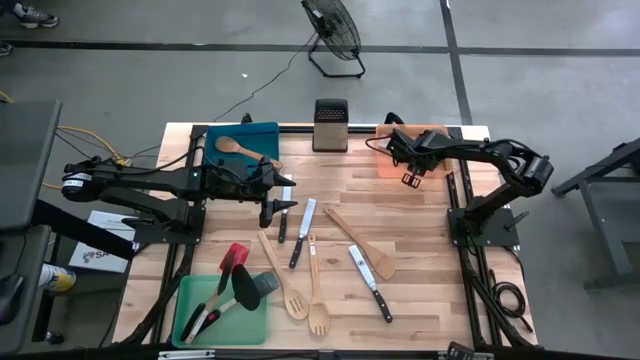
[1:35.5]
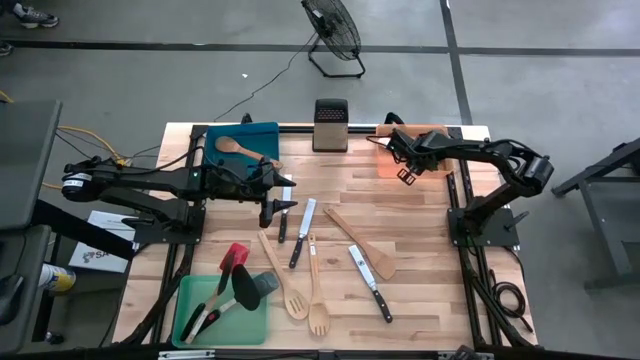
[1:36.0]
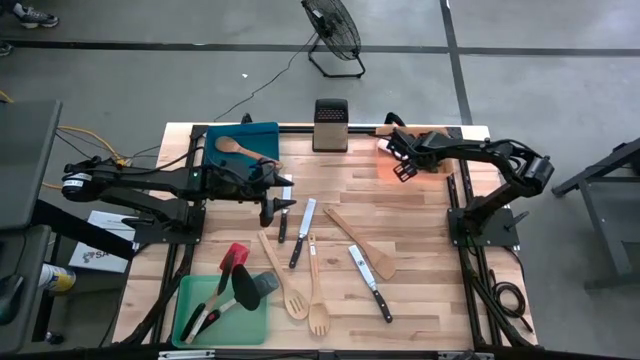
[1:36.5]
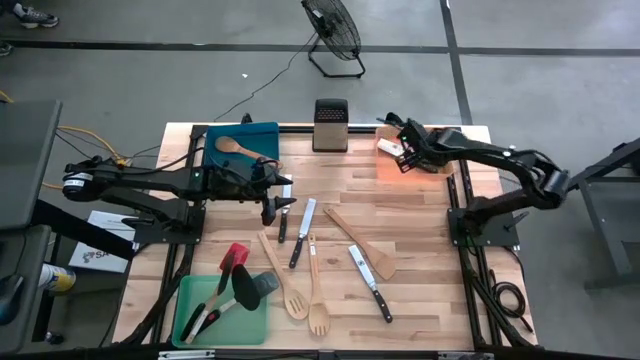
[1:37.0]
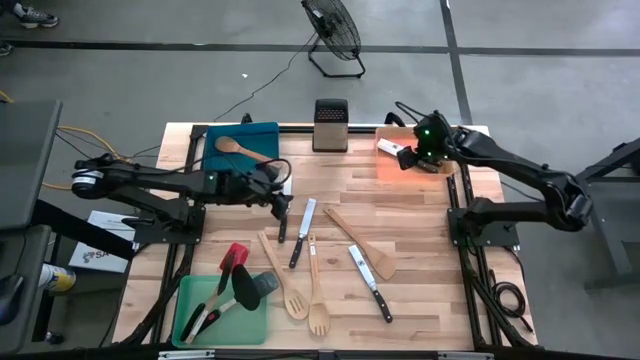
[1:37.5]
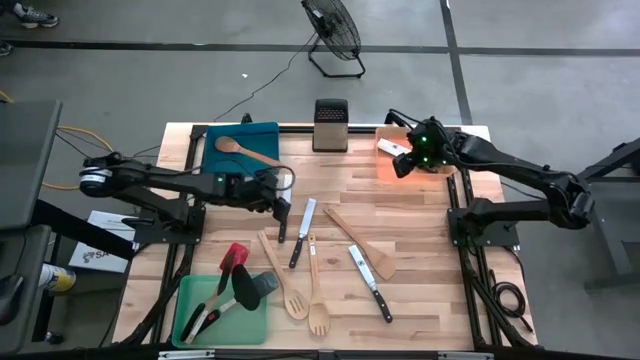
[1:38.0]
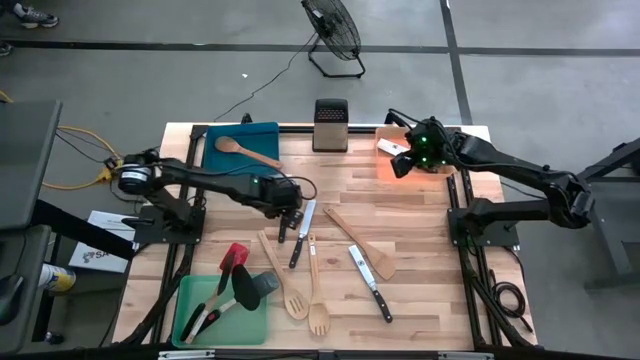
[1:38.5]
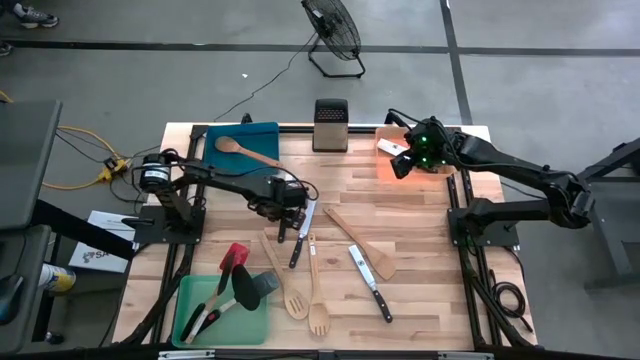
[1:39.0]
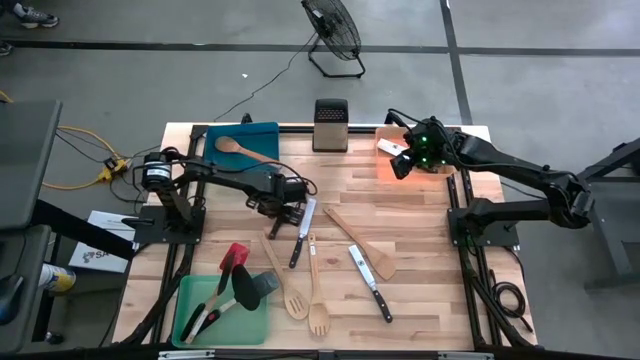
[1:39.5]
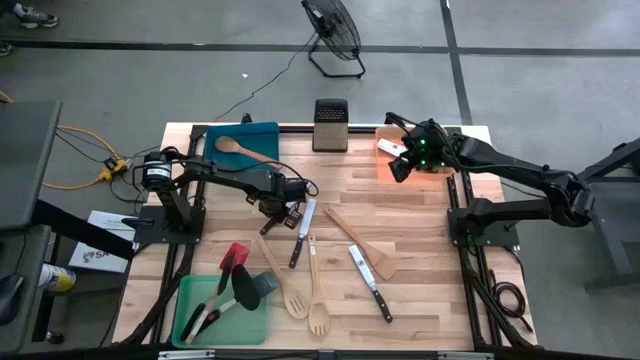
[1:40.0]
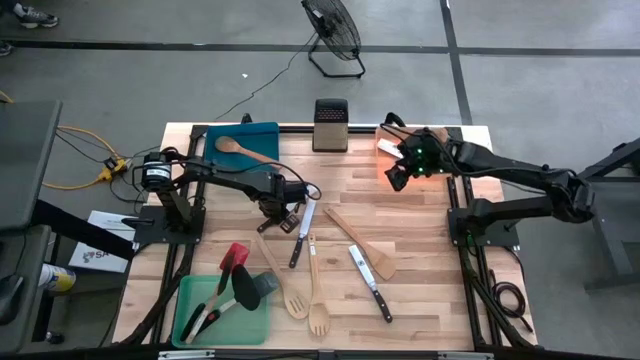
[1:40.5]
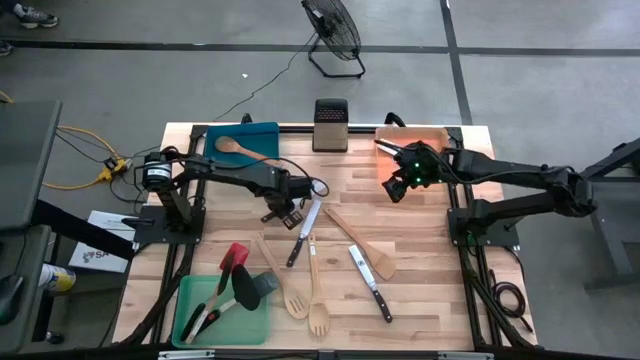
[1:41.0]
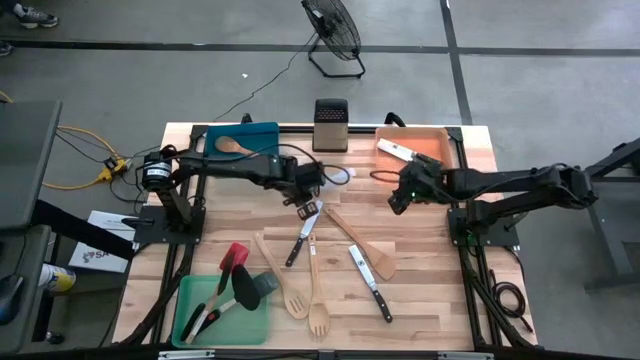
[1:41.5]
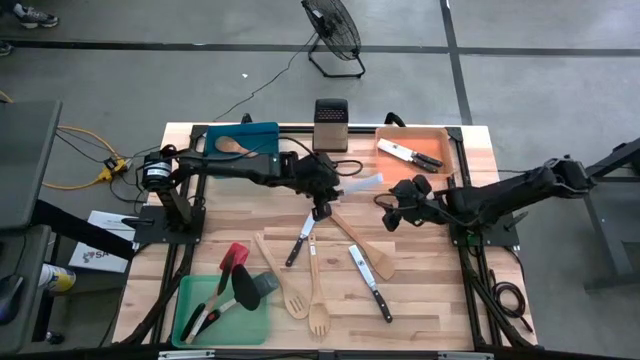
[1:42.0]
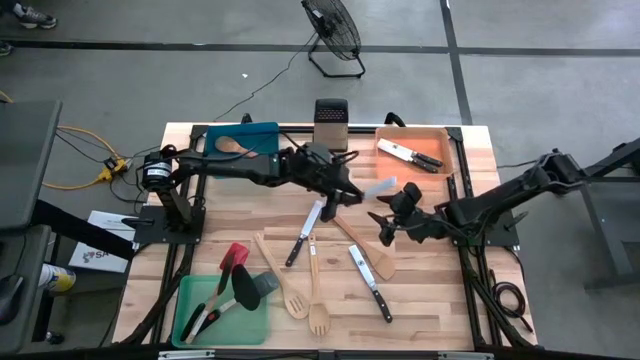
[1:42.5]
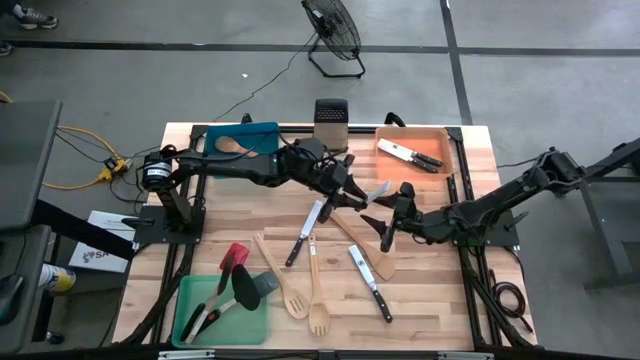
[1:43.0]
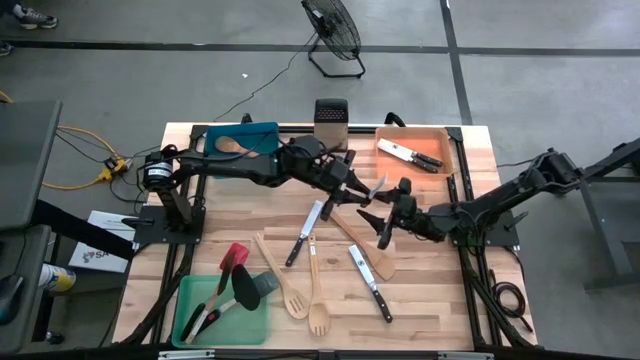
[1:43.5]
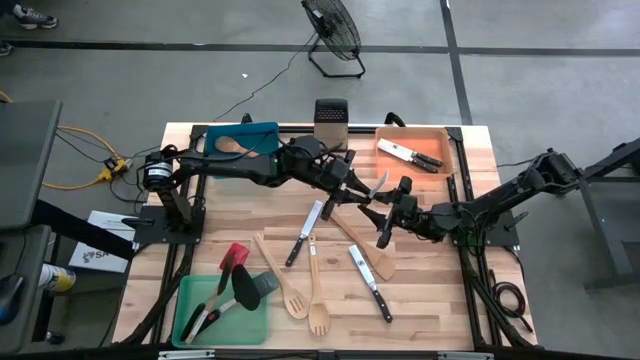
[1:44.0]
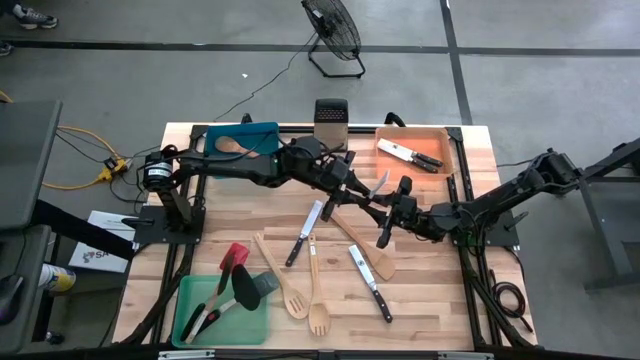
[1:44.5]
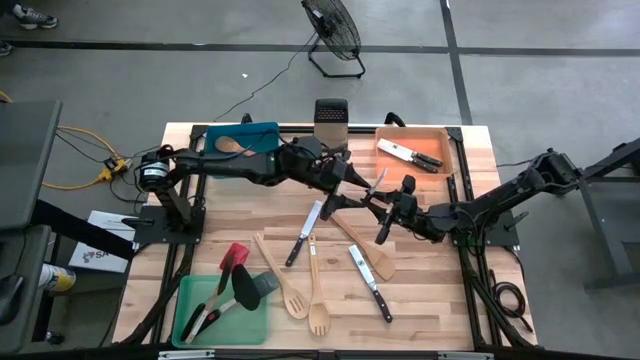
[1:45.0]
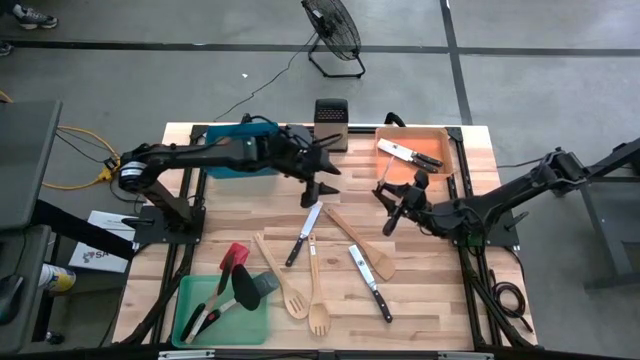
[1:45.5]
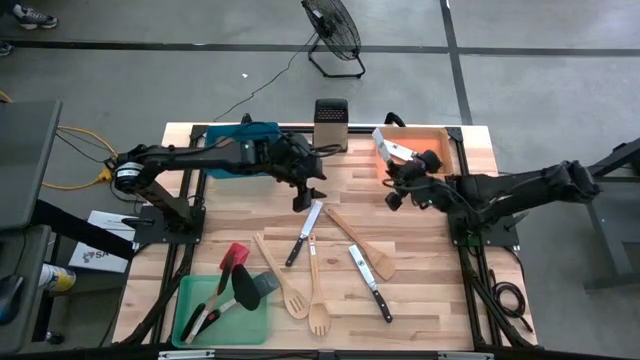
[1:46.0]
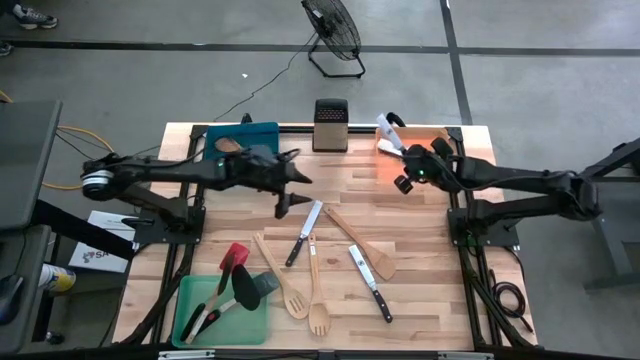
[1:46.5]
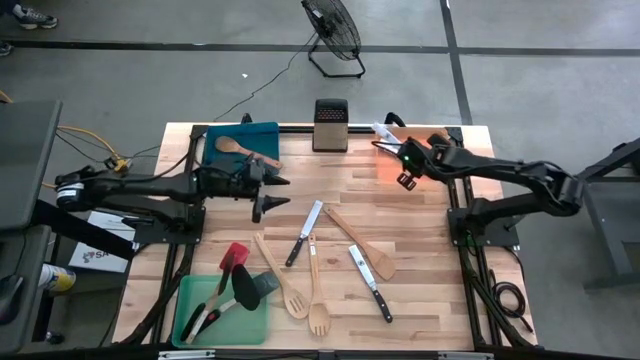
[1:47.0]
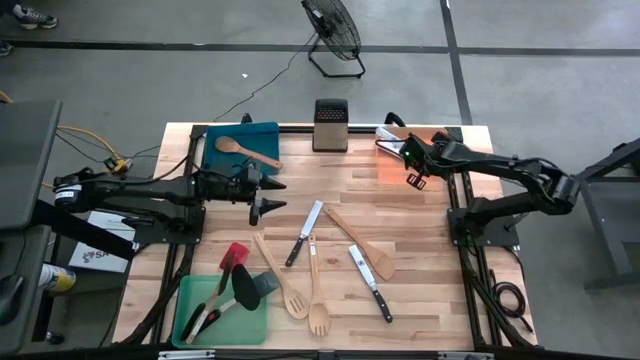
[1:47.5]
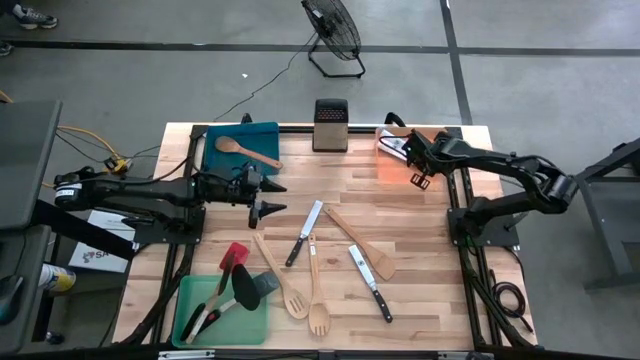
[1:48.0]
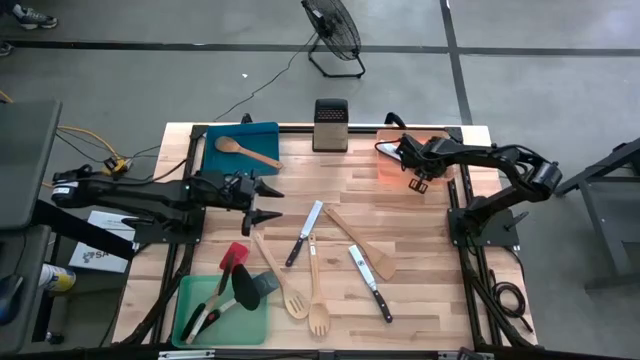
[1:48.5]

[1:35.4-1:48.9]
Task: Pick & Place Kitchen Items
Put the black spatula into the orange bin

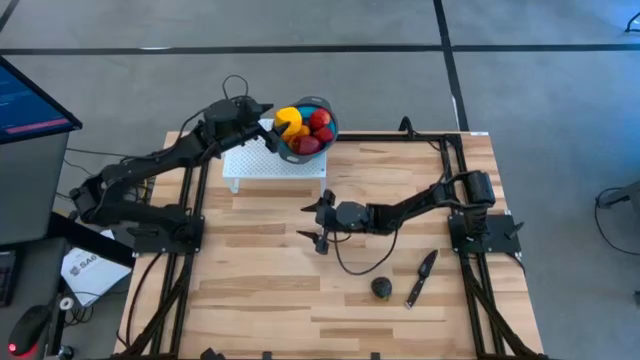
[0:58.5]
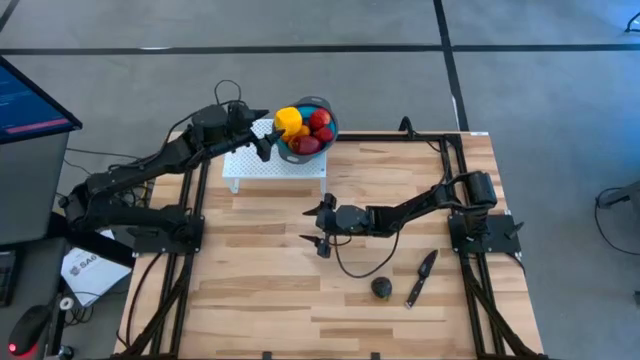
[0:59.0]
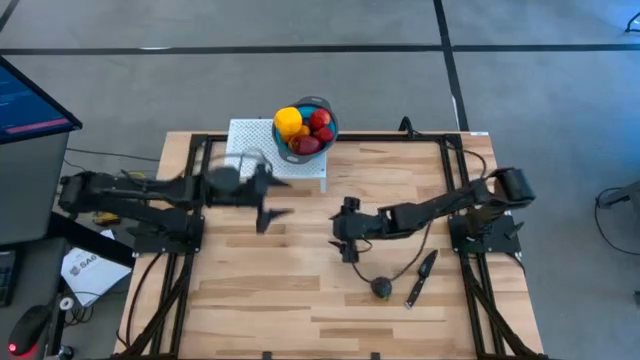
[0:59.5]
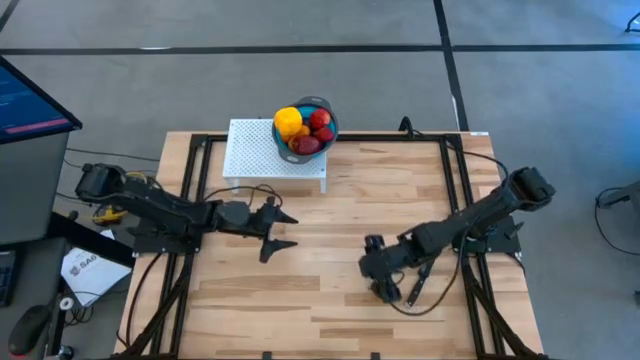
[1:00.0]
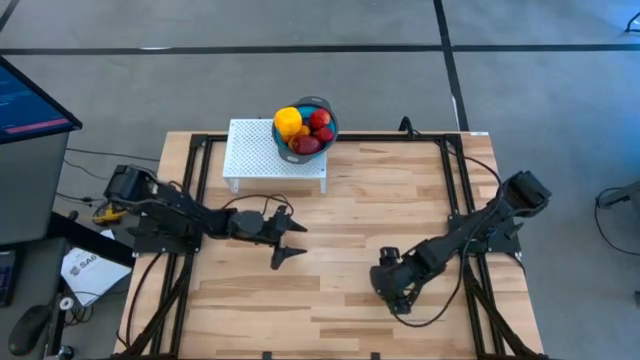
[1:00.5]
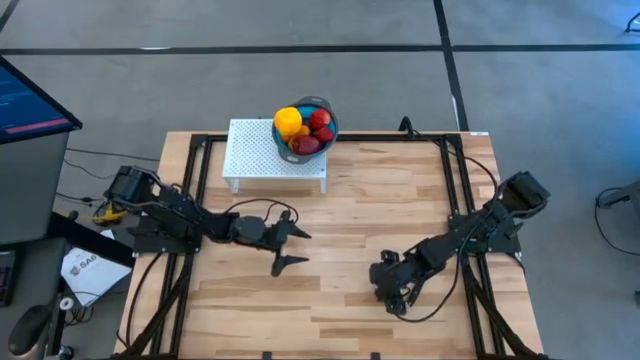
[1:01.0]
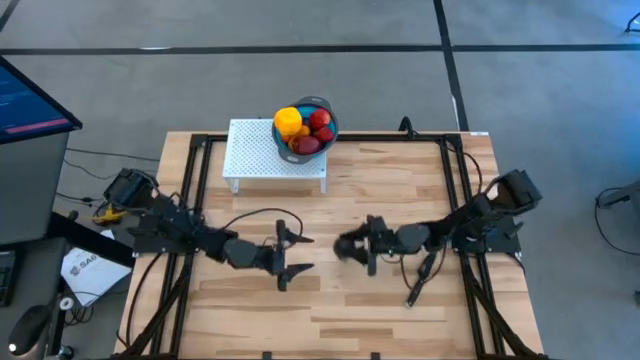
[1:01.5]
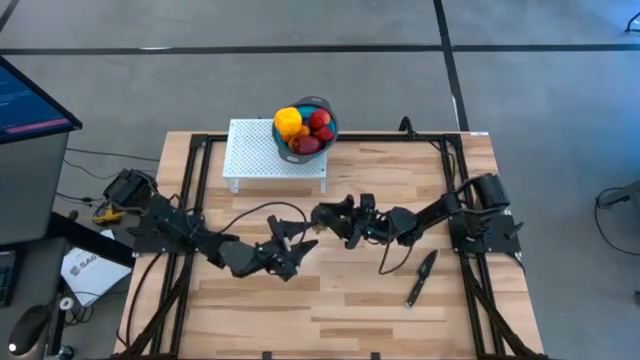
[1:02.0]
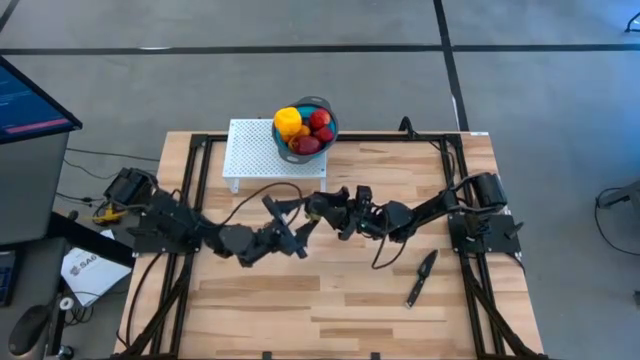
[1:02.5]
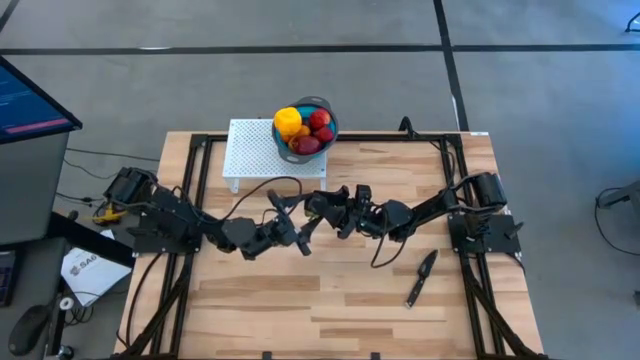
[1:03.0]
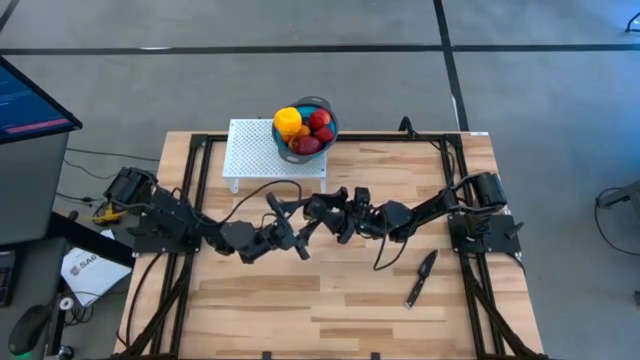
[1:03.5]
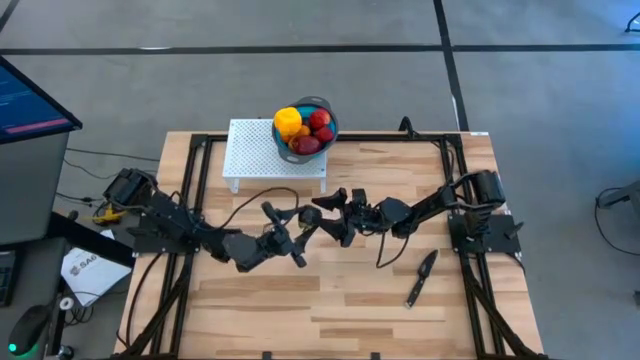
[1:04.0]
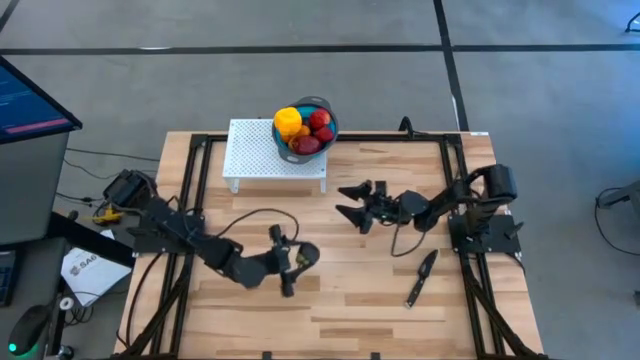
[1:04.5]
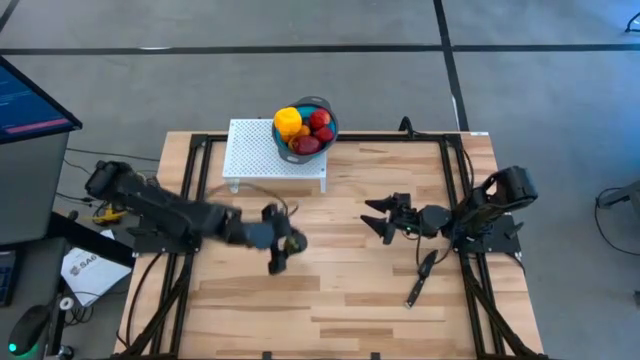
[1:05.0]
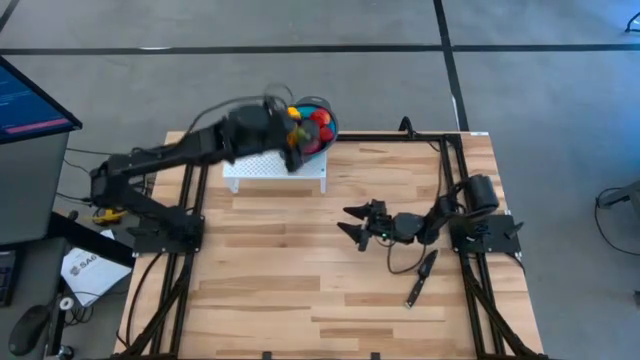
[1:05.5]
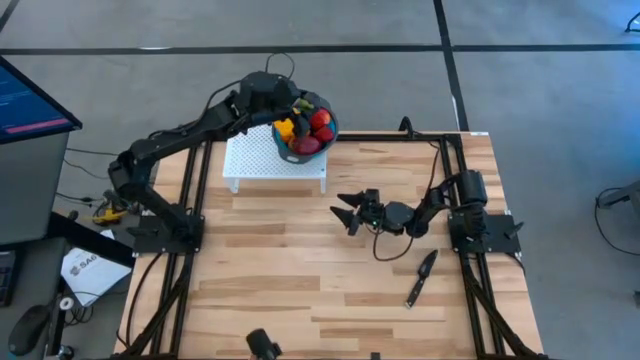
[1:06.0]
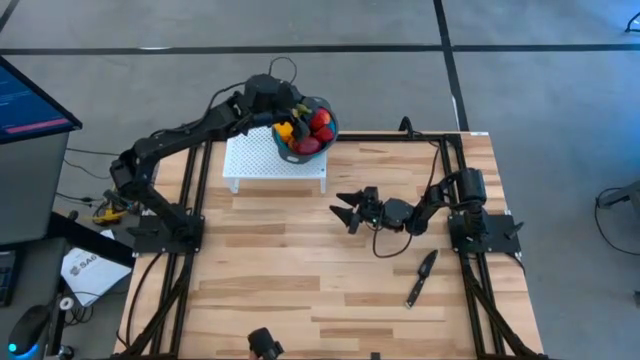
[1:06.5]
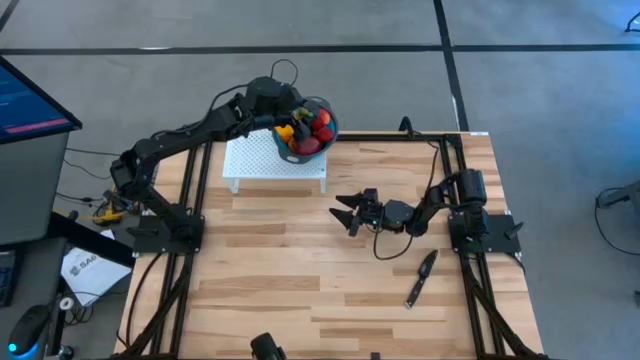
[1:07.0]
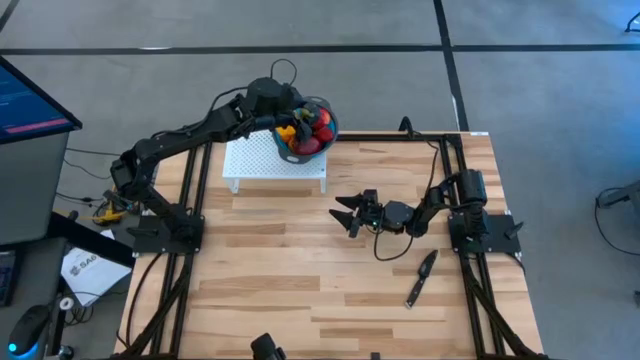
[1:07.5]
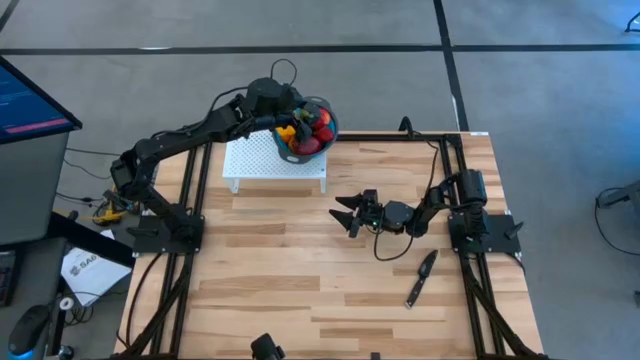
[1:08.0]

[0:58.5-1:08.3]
Task: Pick & Place Fruit
Put the black mangosteen into the blue strainer bowl
